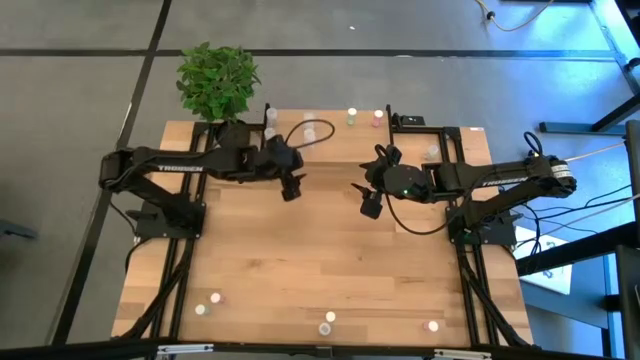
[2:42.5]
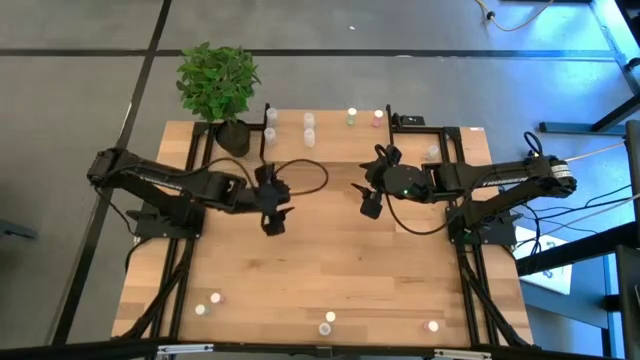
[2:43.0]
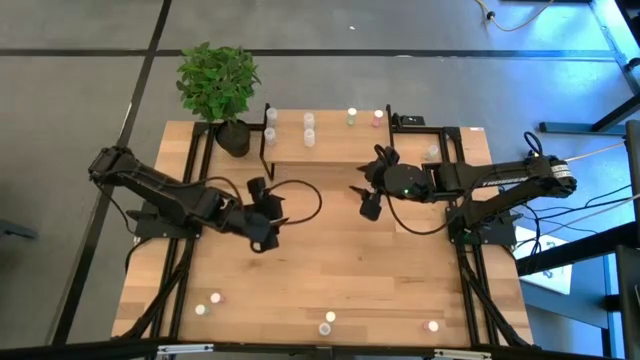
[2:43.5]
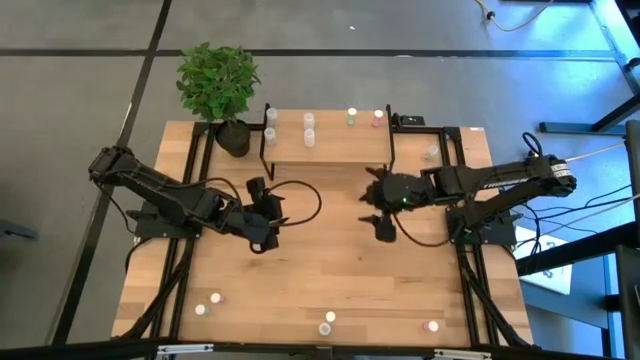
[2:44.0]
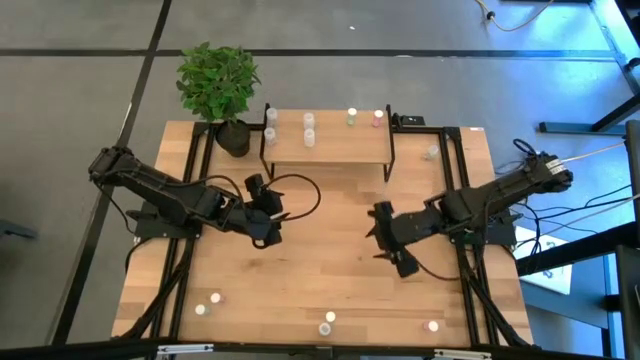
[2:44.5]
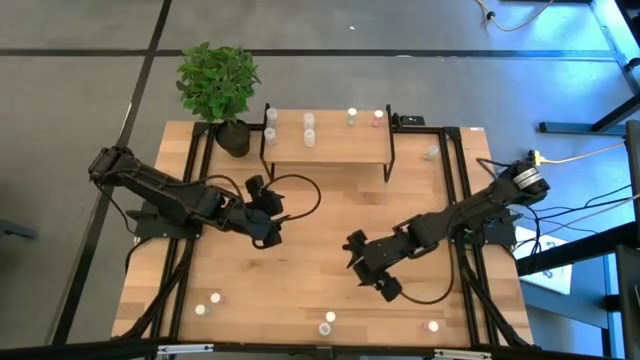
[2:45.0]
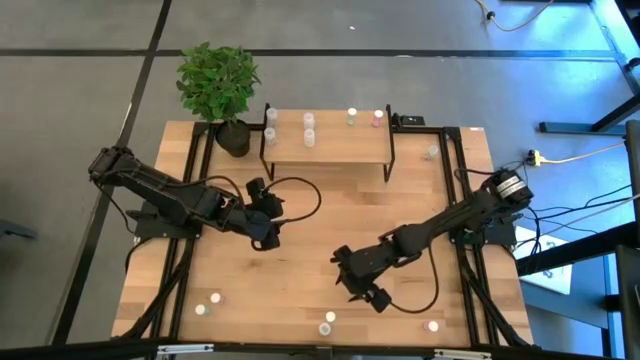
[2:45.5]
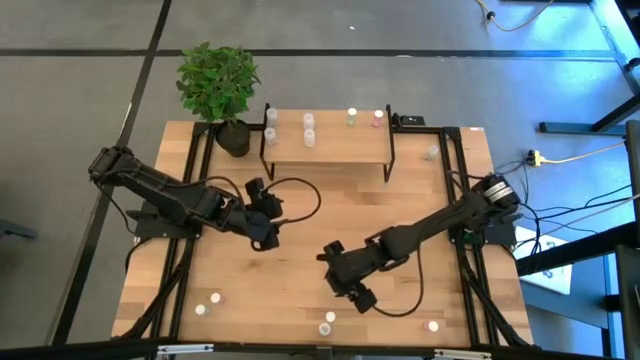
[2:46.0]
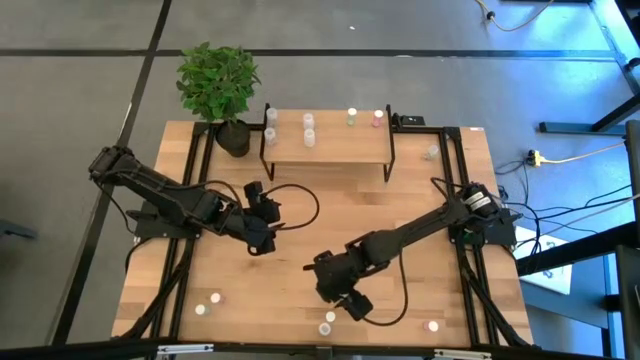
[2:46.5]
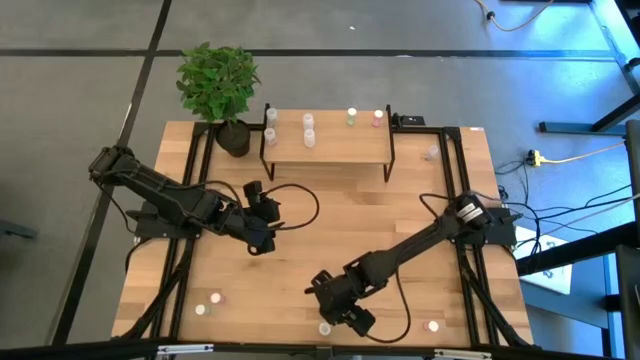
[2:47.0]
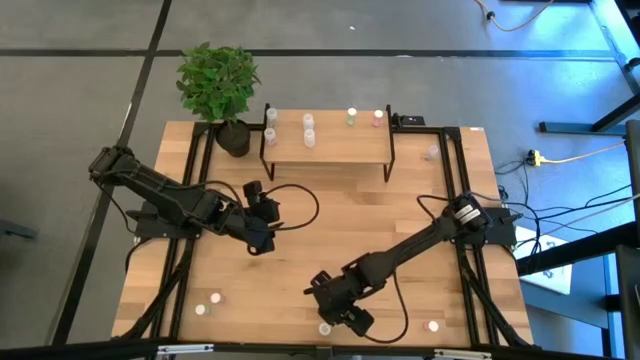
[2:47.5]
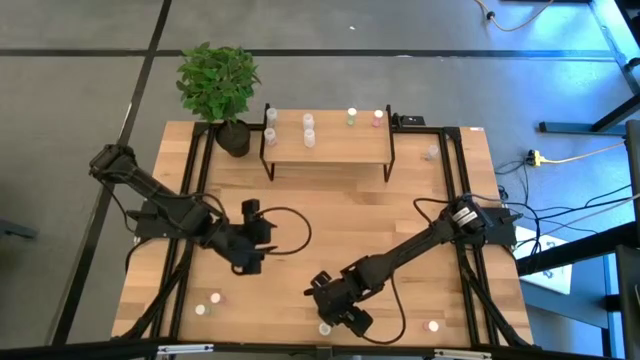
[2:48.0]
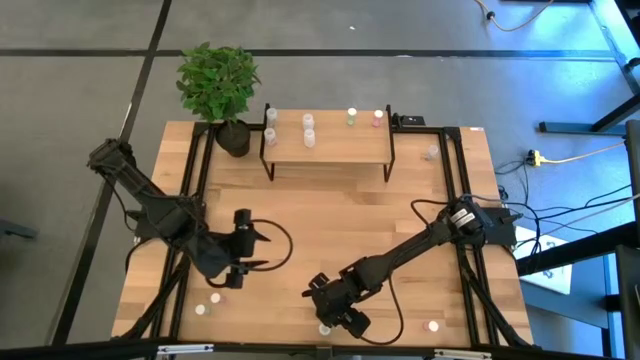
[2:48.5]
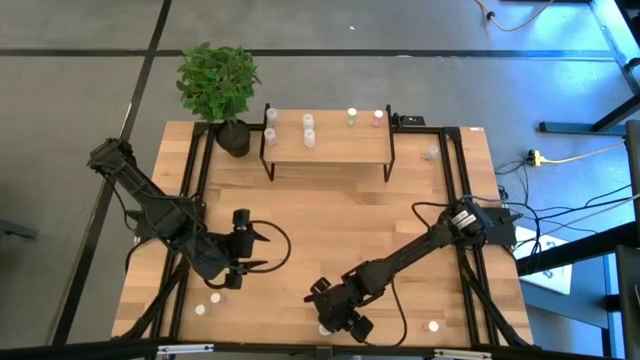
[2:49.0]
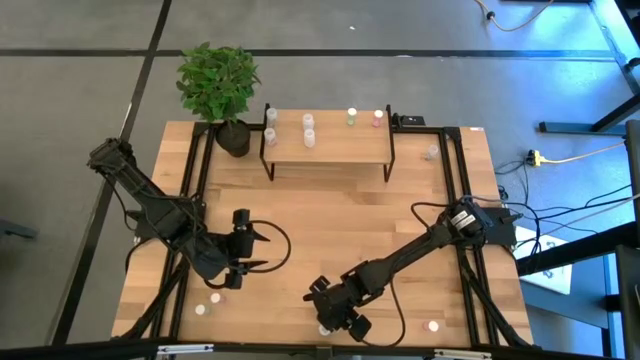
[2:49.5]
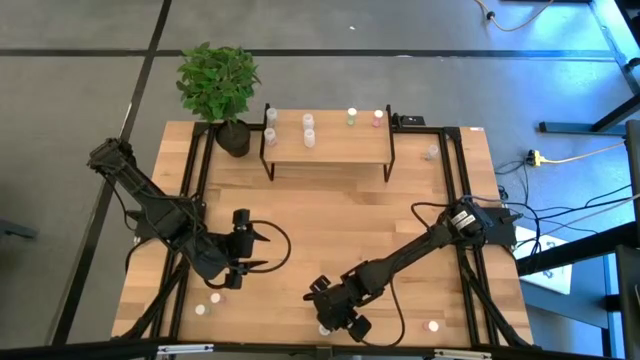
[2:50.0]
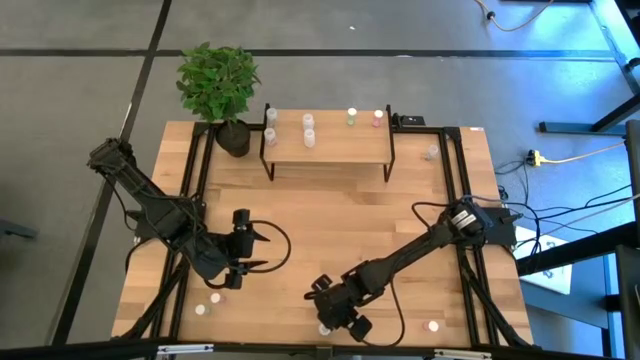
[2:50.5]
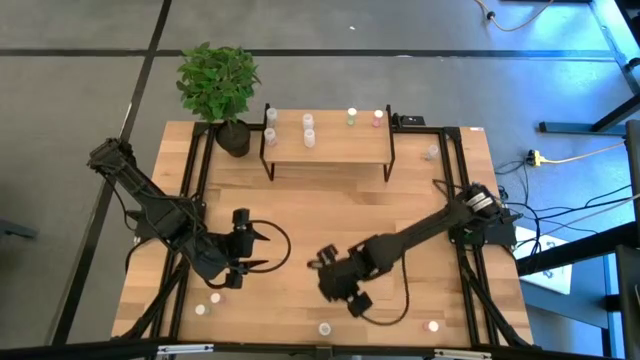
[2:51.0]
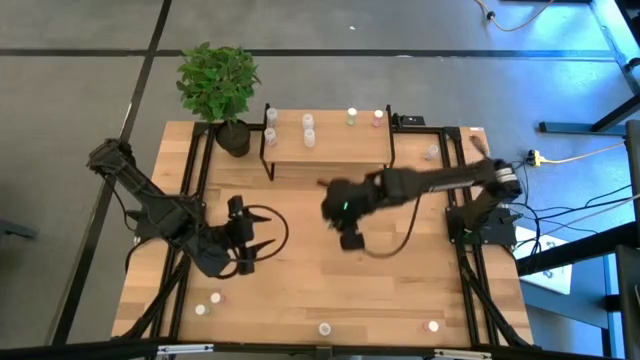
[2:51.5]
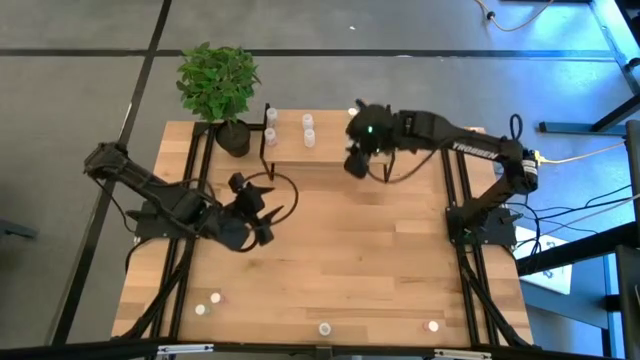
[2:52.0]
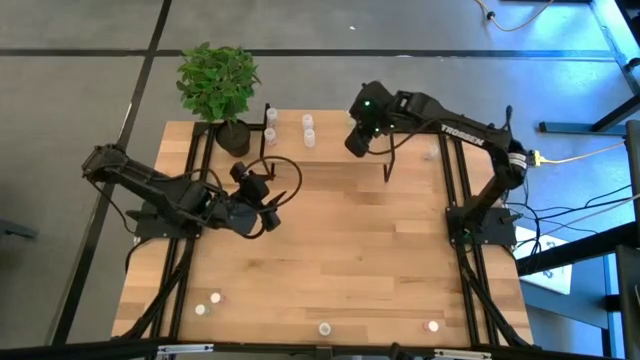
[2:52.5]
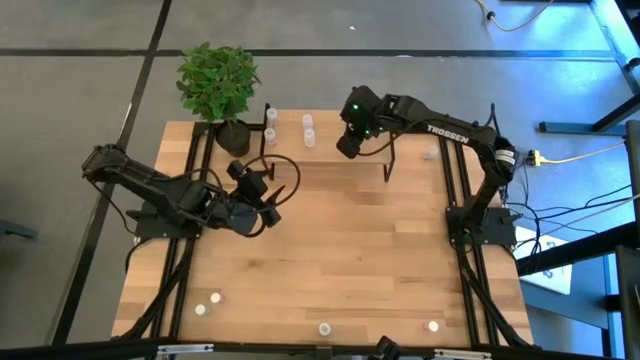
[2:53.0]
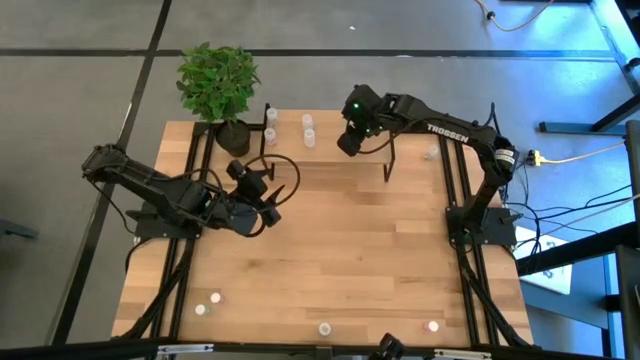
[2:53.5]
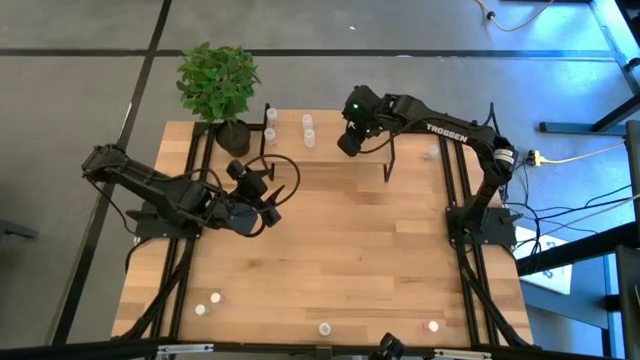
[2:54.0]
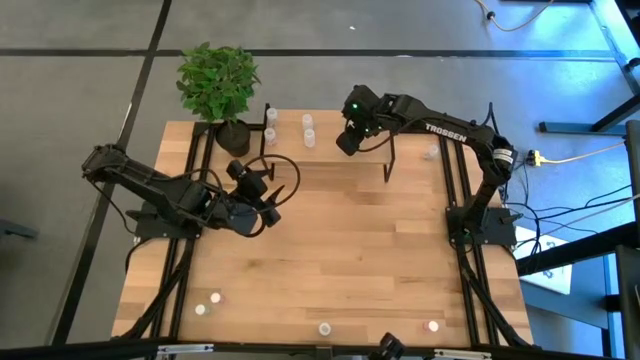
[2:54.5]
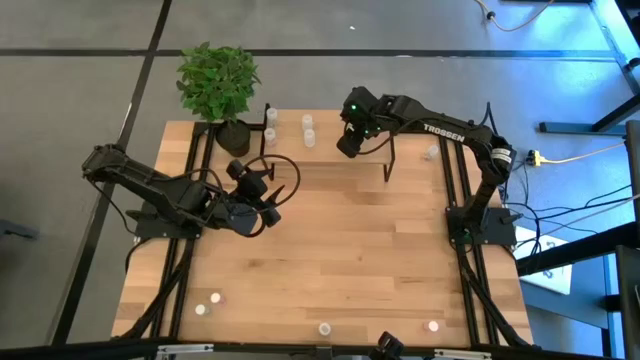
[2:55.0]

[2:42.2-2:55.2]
Task: Pick and place medicine bottles onto shelf by color
Put the right green pill bottle on the shelf aligned with the other green pill bottle

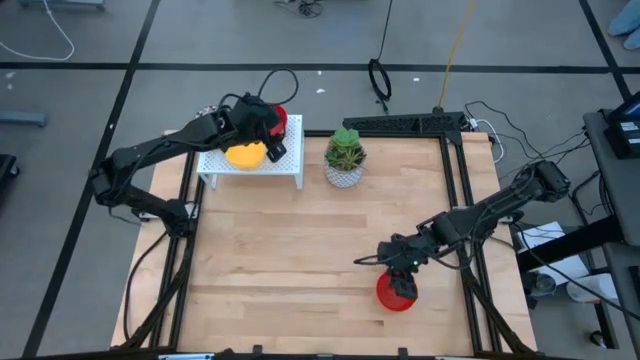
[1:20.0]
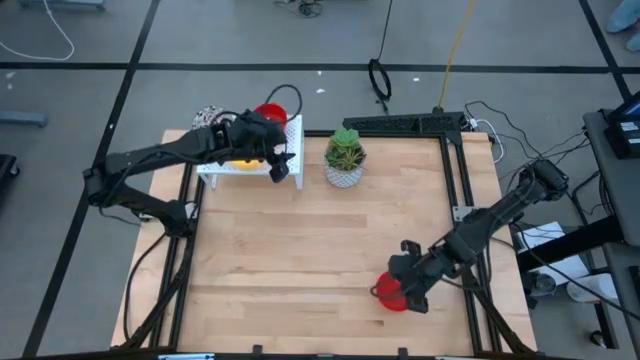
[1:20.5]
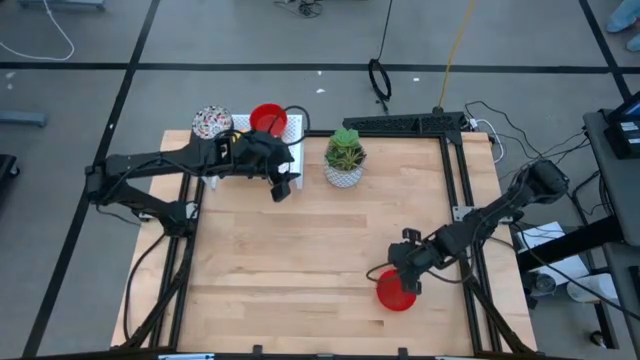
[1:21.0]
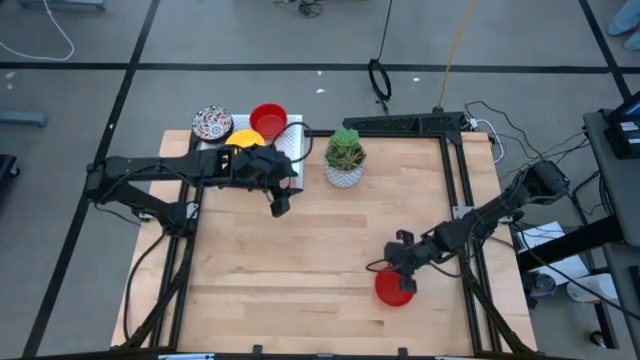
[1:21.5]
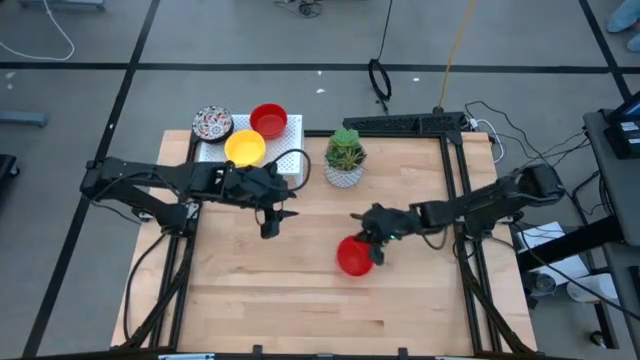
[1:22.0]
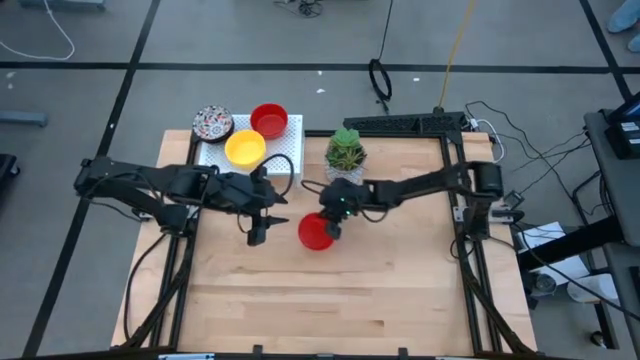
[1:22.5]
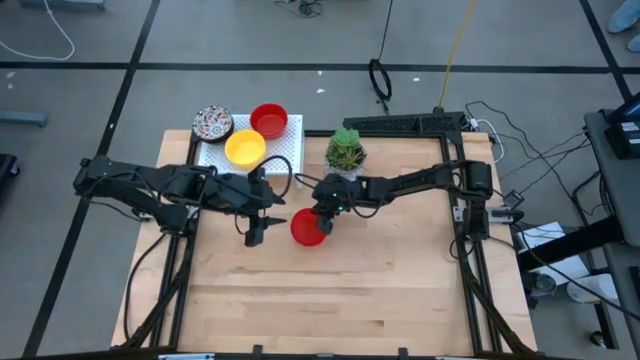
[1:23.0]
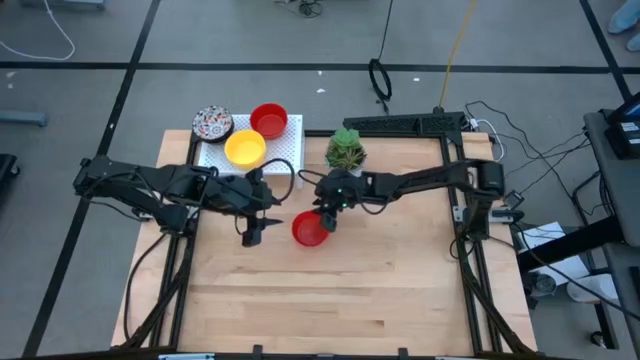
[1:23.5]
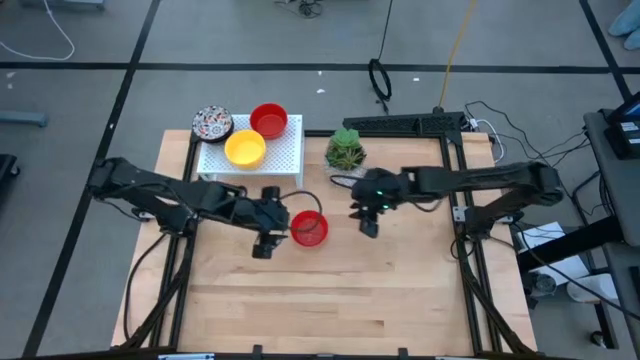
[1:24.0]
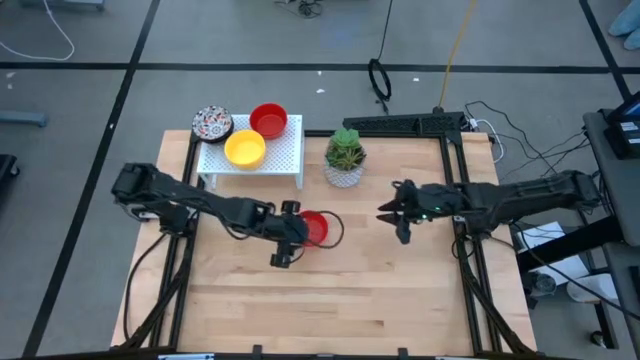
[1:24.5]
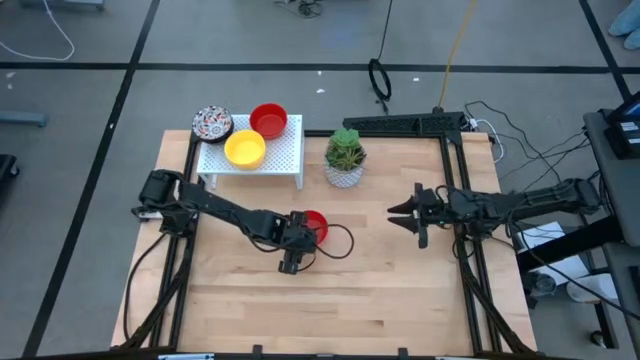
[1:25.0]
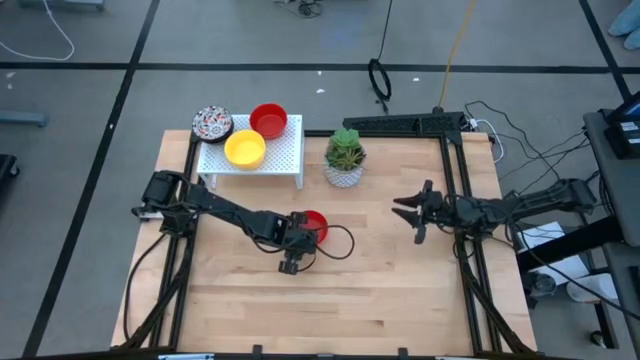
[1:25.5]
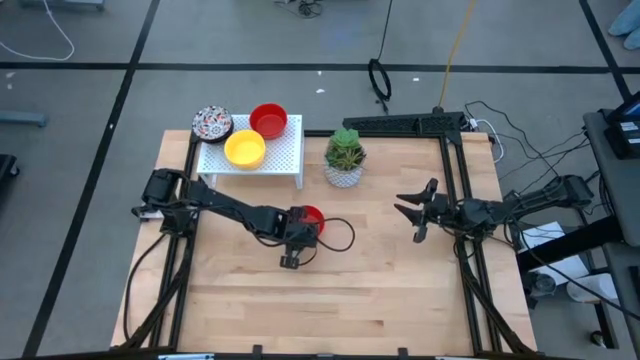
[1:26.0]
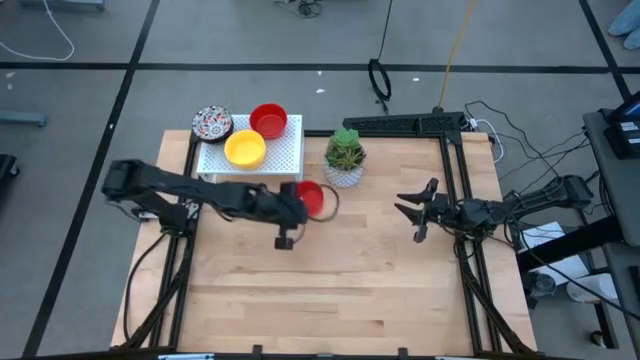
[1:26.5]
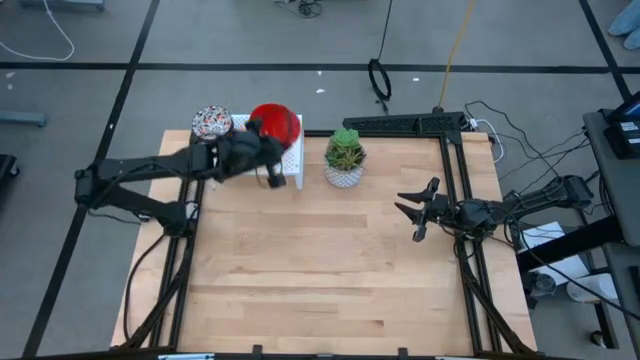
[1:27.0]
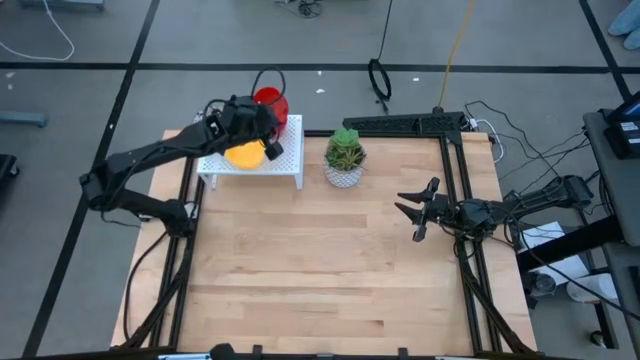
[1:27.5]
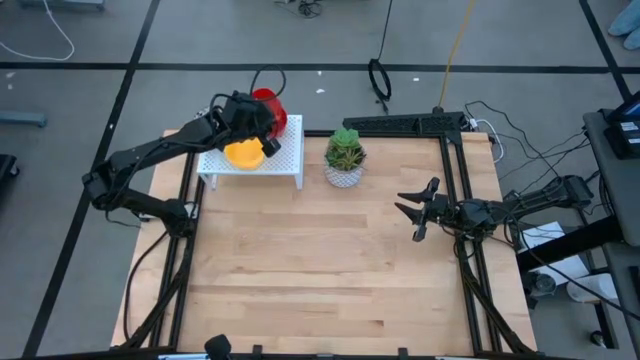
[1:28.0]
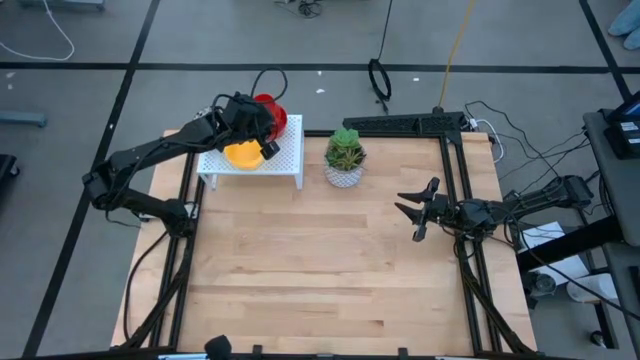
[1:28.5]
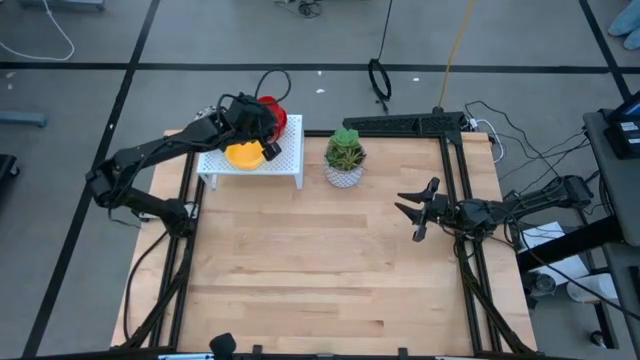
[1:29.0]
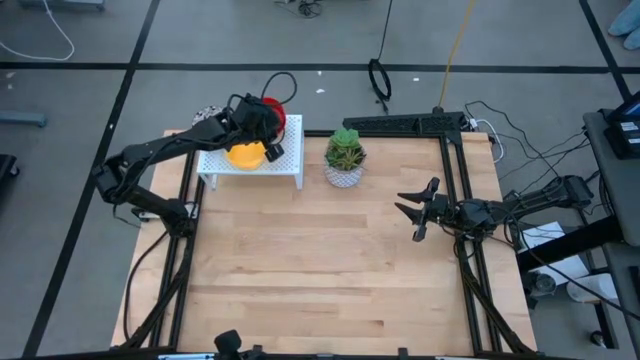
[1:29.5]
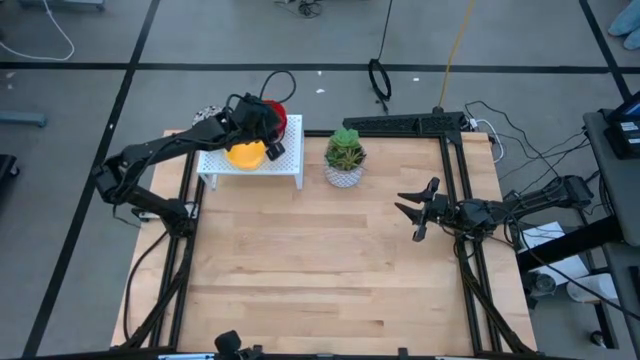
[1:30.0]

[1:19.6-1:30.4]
Task: Pick & Place Mini bowls
Stack the red bowl on top of the red bowl on the shelf
